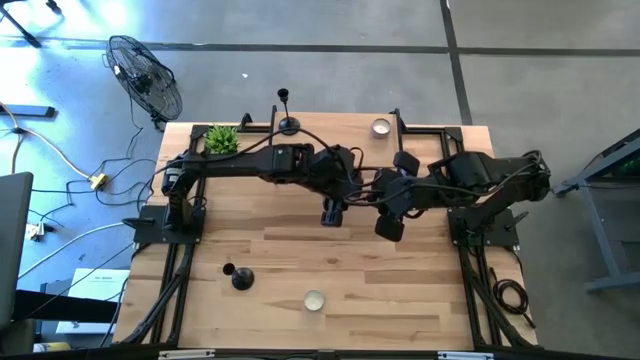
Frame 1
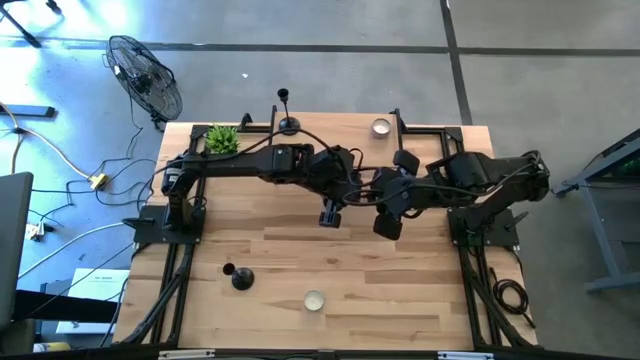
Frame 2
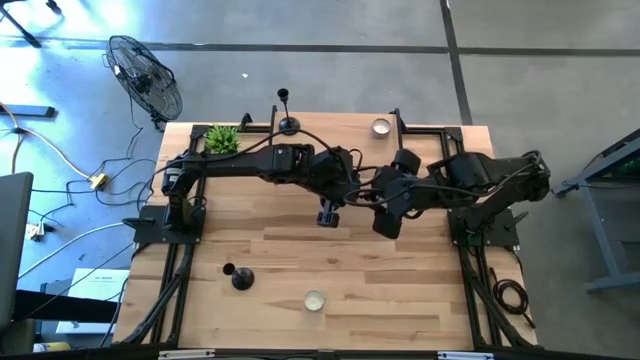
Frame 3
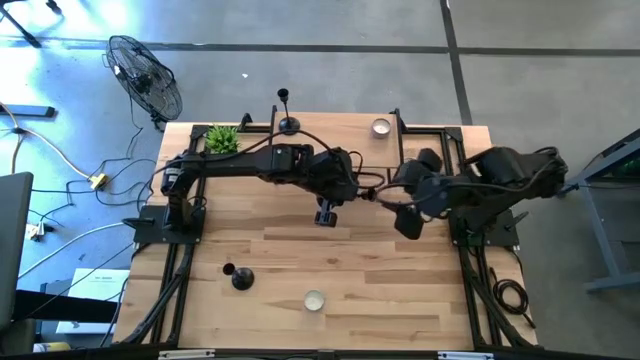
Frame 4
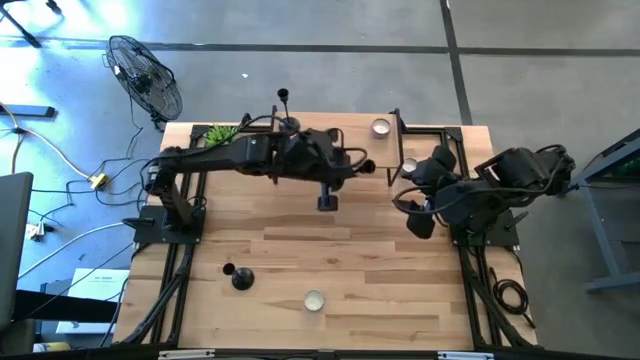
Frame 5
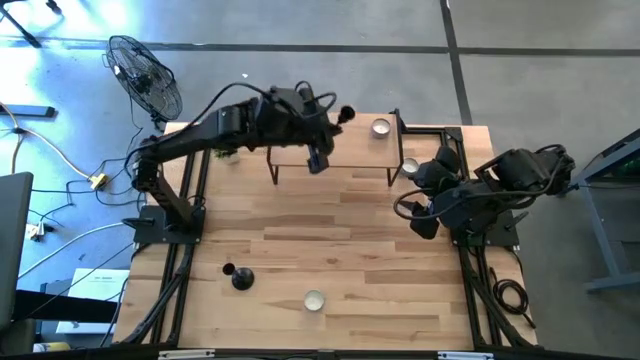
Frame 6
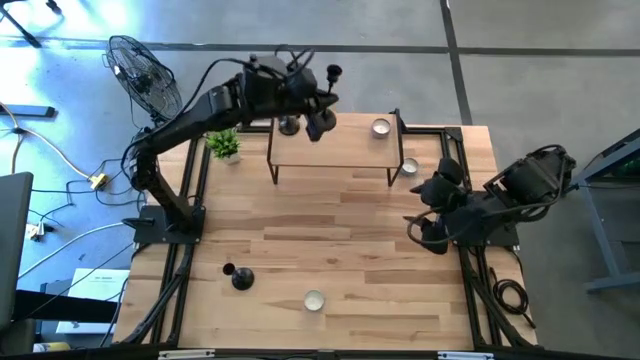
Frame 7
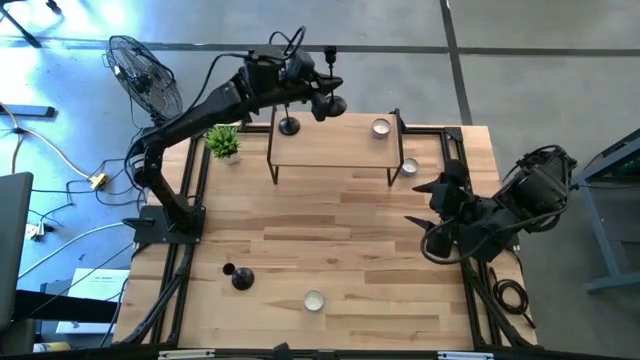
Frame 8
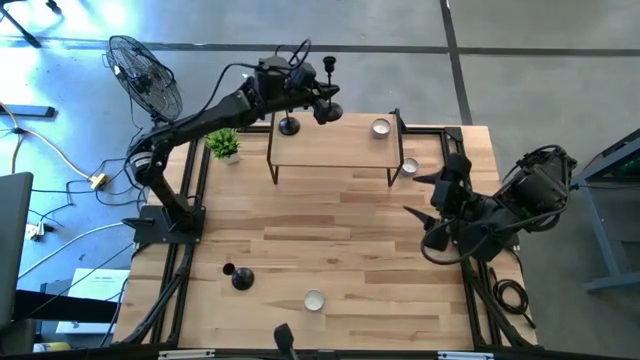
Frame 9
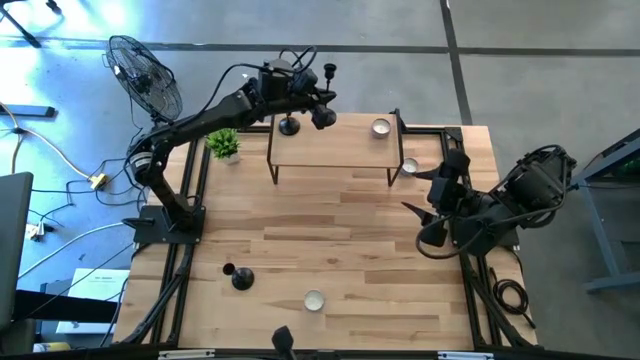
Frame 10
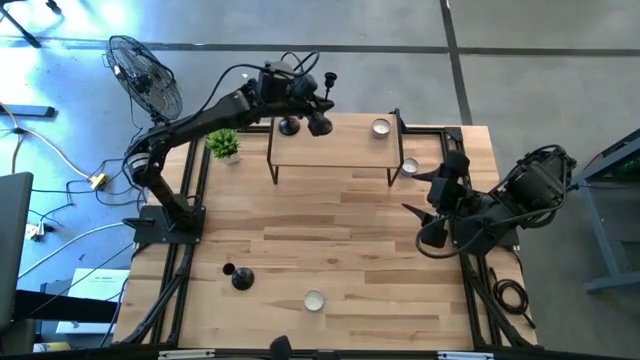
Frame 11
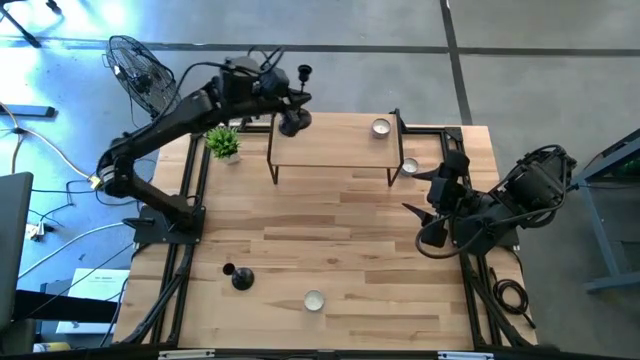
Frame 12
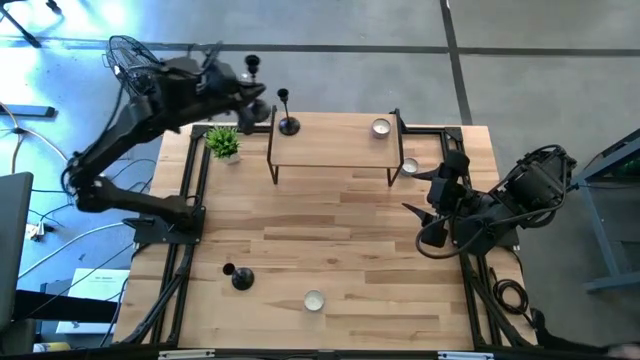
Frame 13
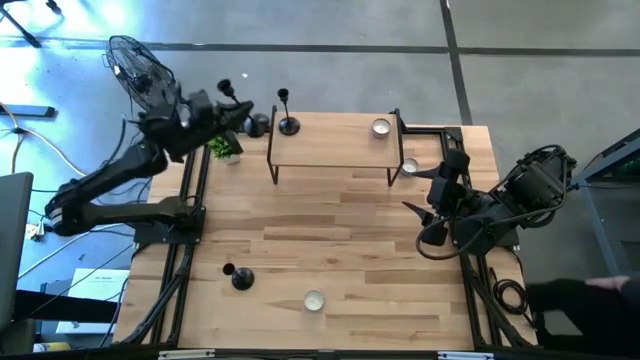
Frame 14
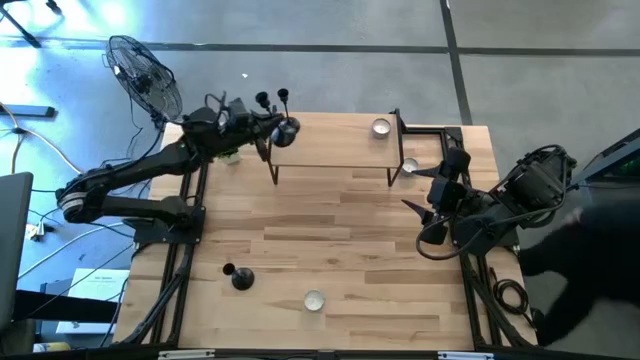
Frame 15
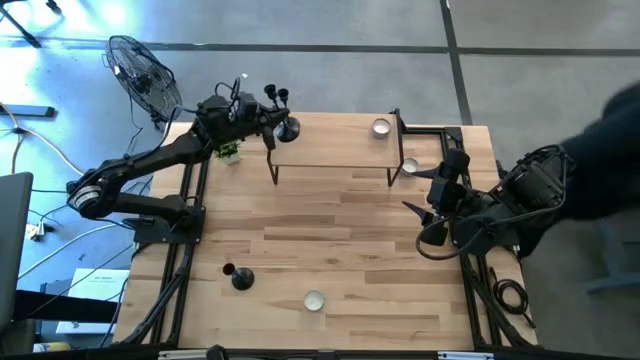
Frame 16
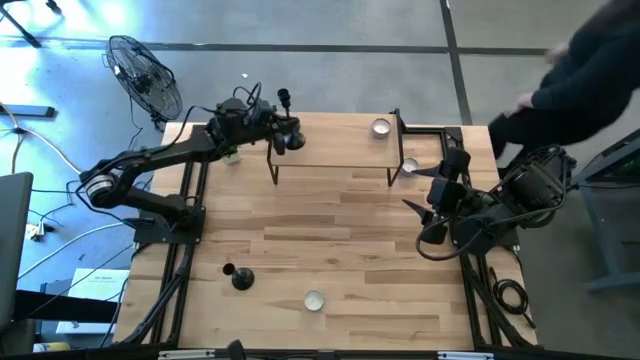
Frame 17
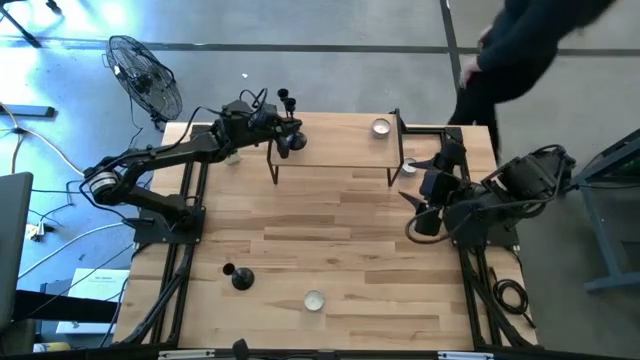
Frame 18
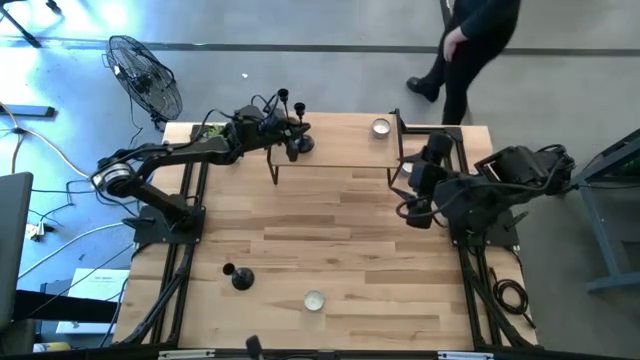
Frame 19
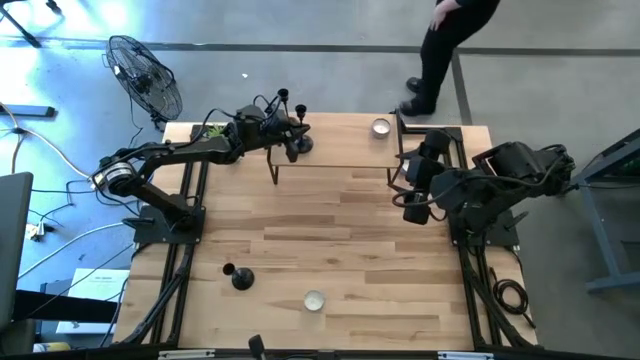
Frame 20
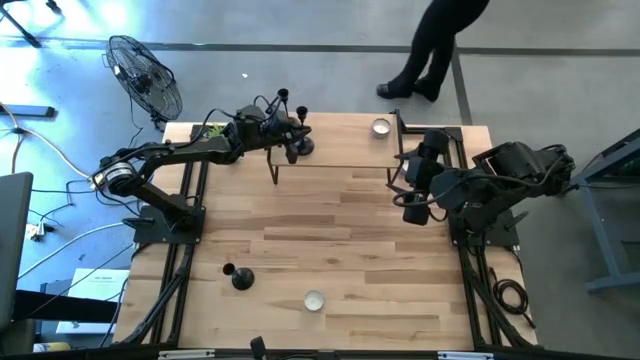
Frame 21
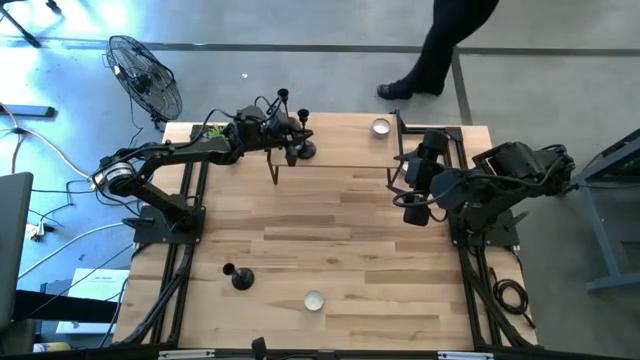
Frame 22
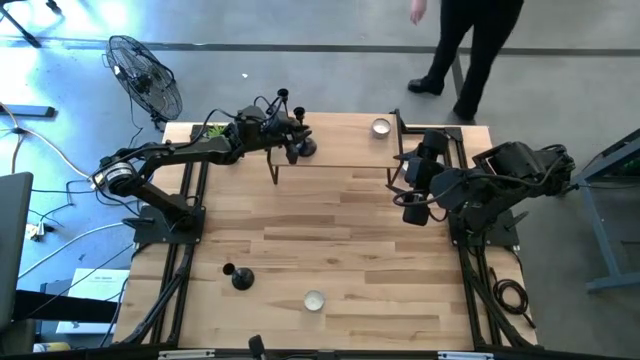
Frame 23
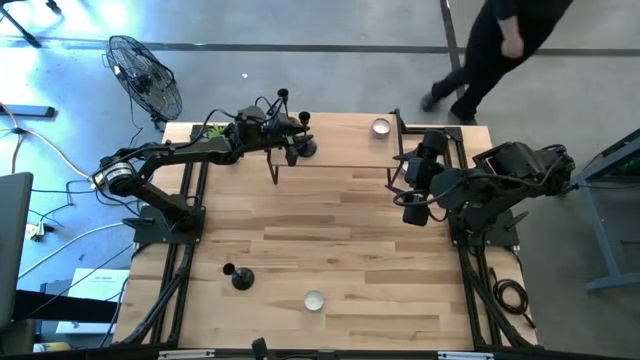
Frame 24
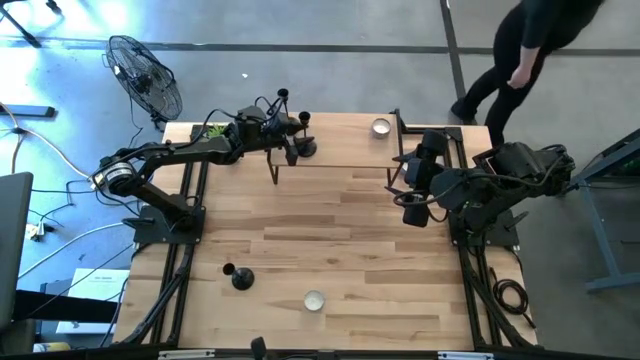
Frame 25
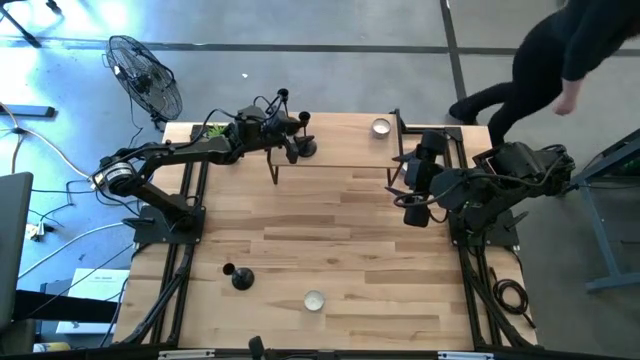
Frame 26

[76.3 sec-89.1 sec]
Task: Pick & Place candle stick holders
Put the right candle holder on the shelf

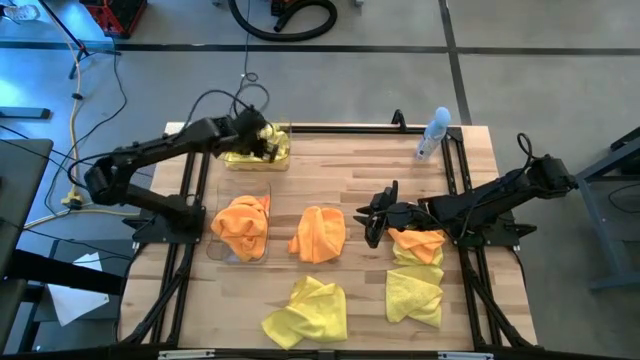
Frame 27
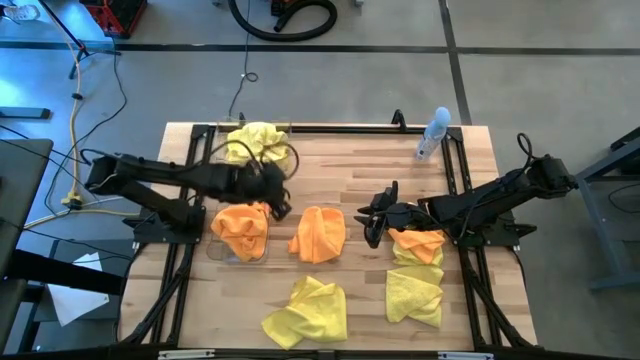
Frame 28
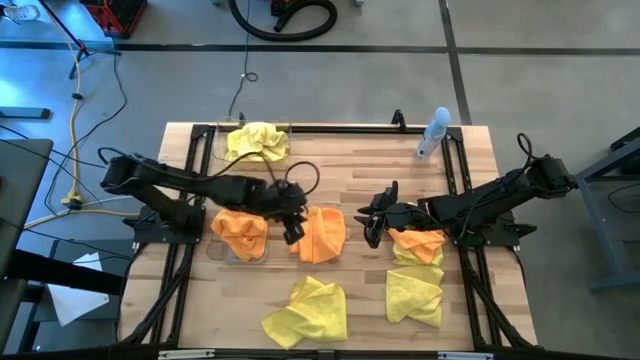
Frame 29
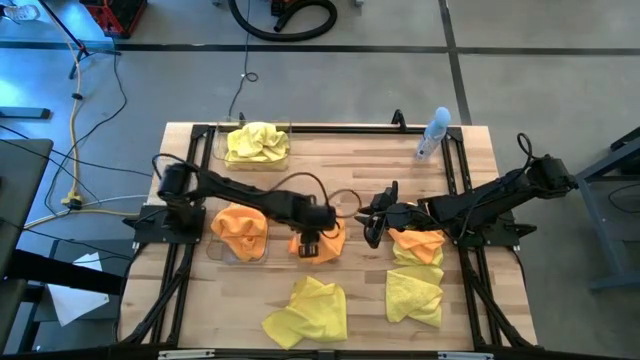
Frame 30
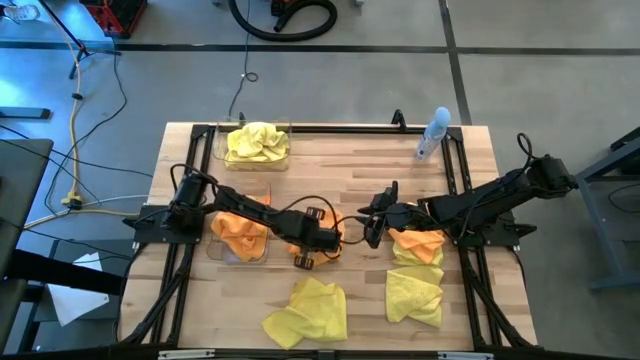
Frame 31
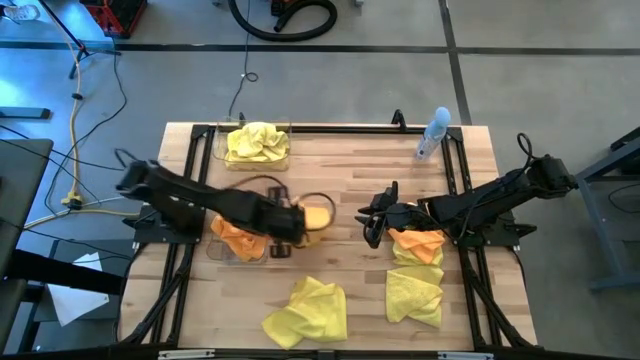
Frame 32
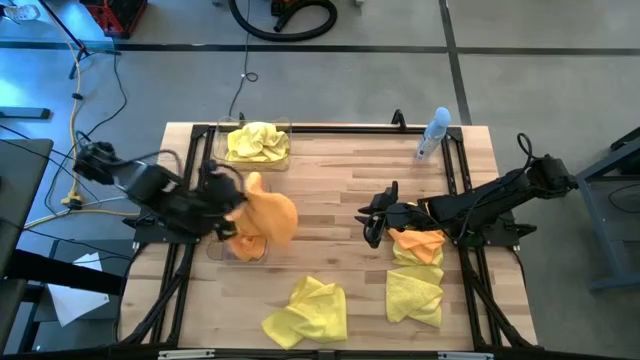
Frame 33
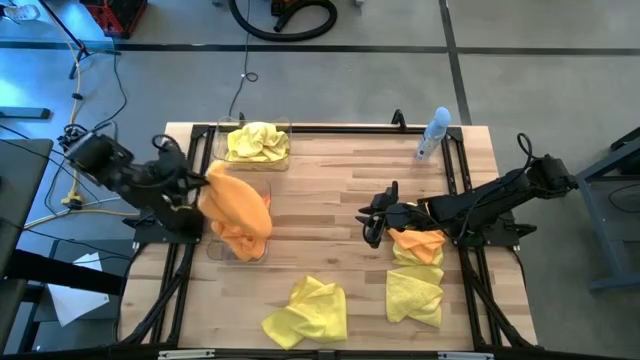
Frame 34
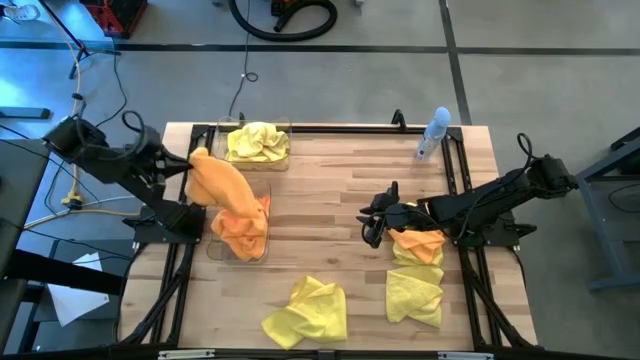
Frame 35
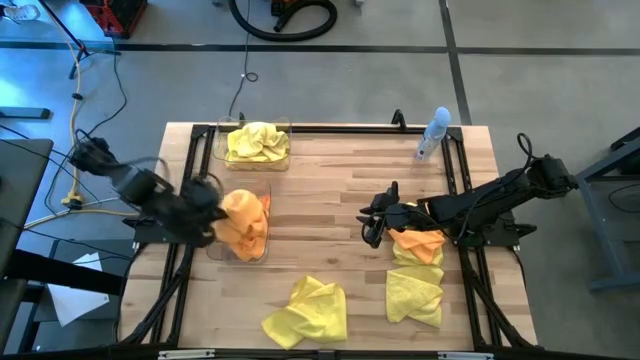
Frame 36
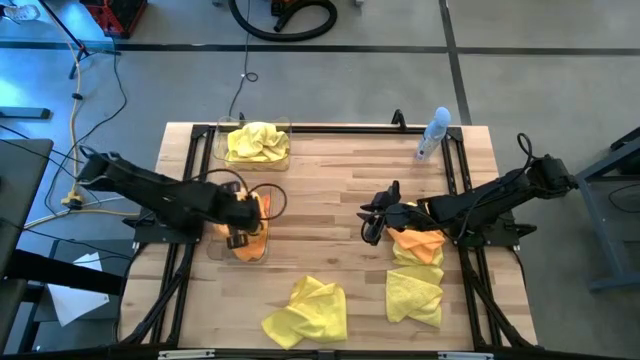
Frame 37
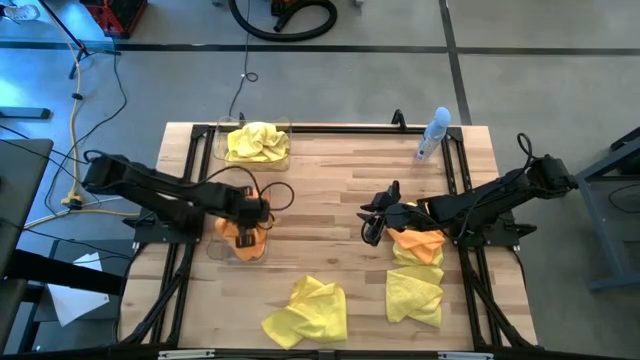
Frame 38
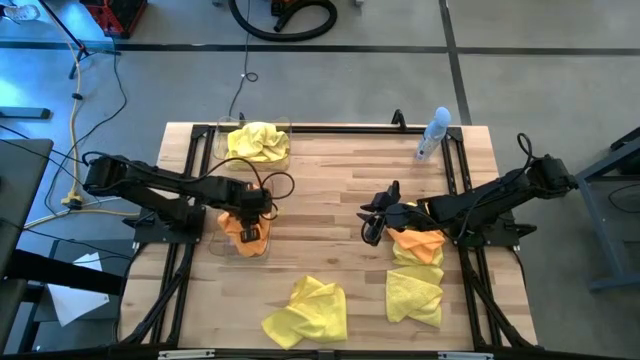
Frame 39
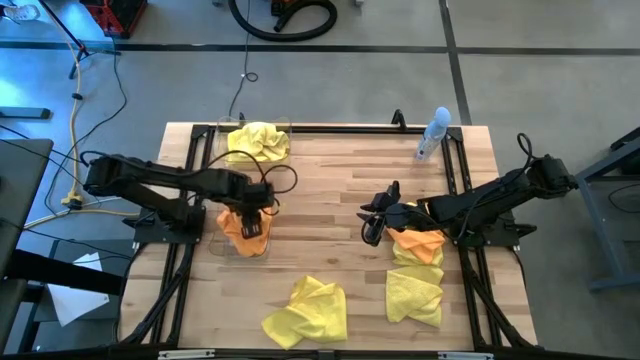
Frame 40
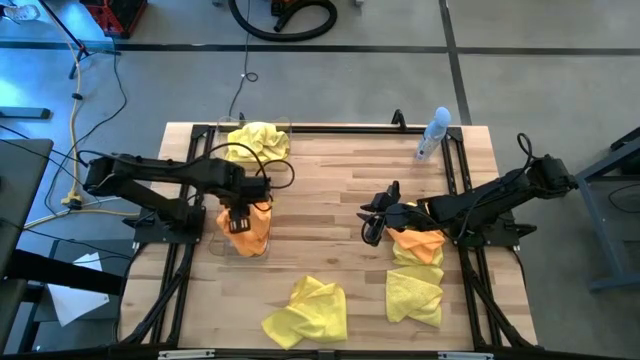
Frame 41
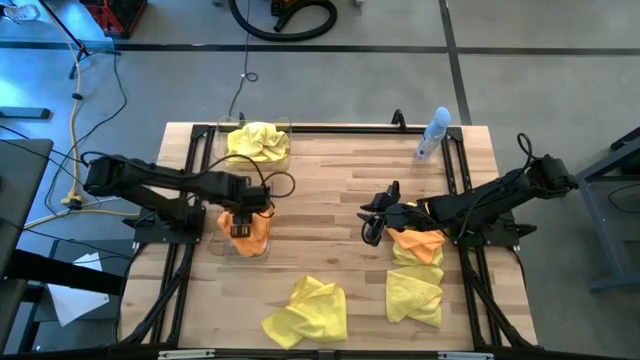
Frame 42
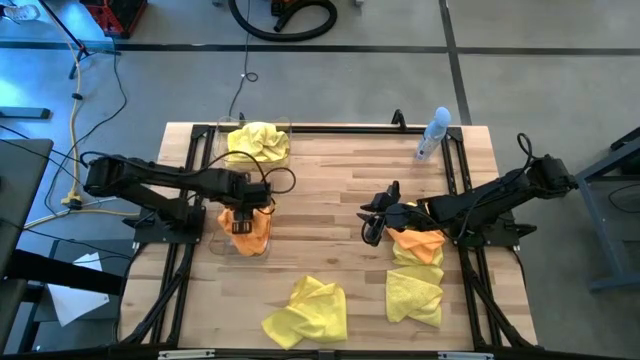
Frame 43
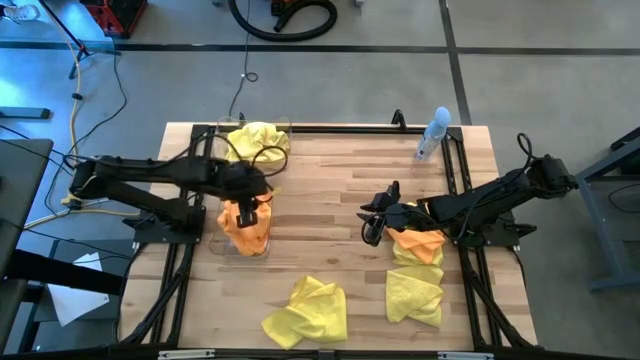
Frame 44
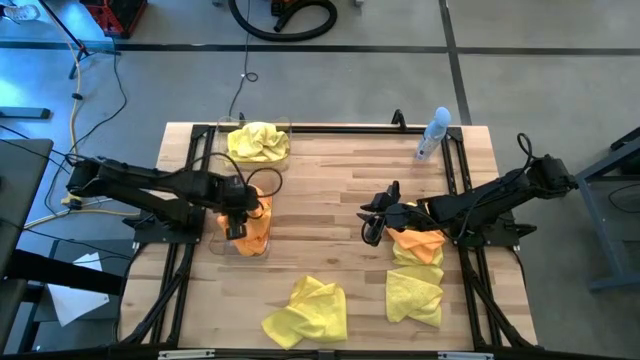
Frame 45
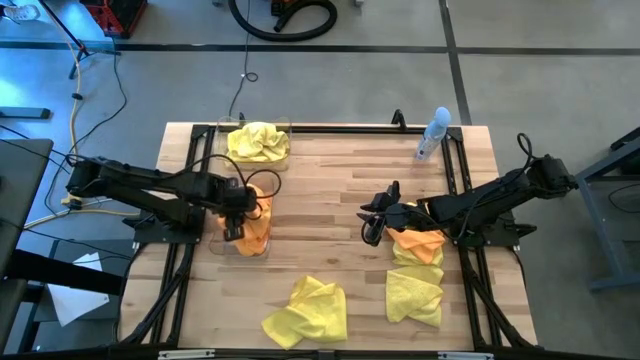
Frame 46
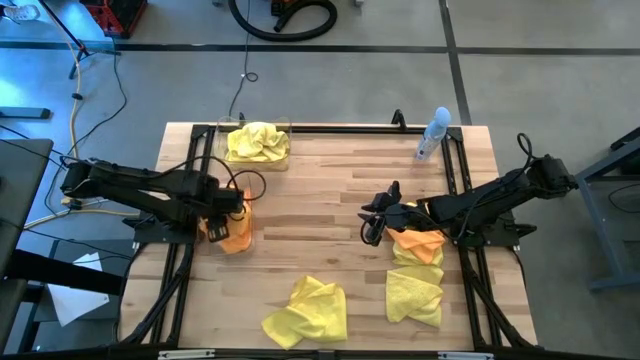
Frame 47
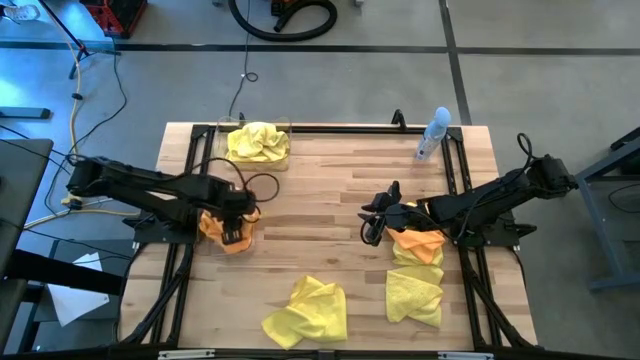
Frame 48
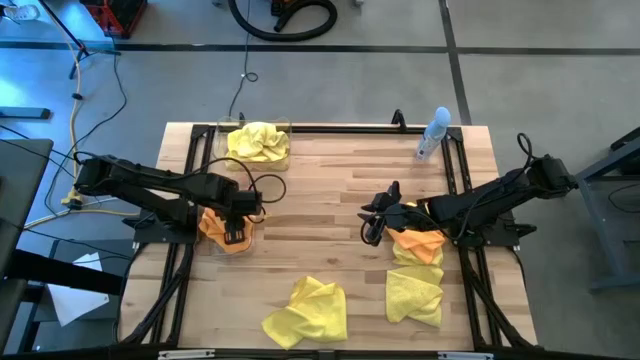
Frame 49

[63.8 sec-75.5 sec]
Task: Sort microfiber towel by color & place in baskets
Put the orange microfiber towel into the bottom transparent bin
